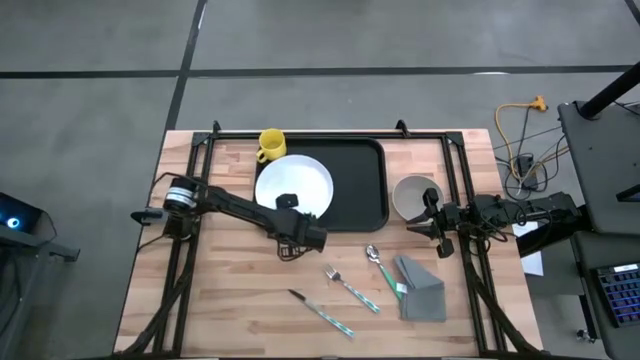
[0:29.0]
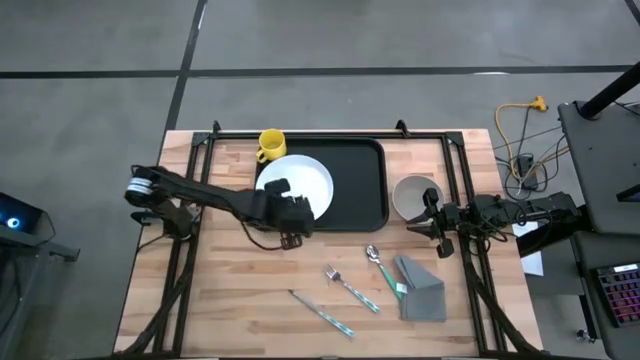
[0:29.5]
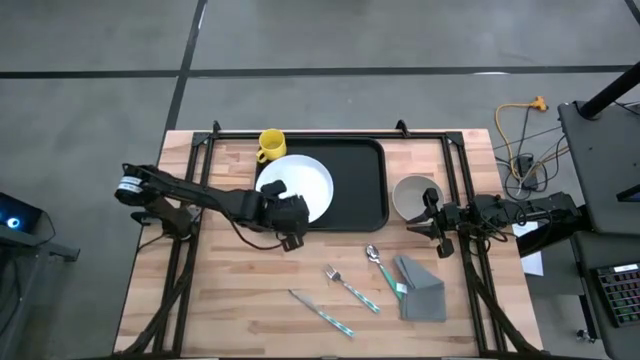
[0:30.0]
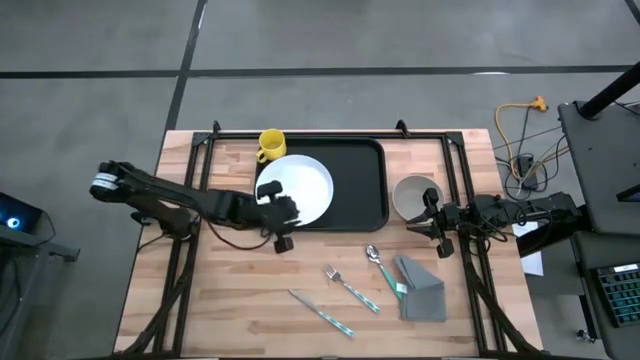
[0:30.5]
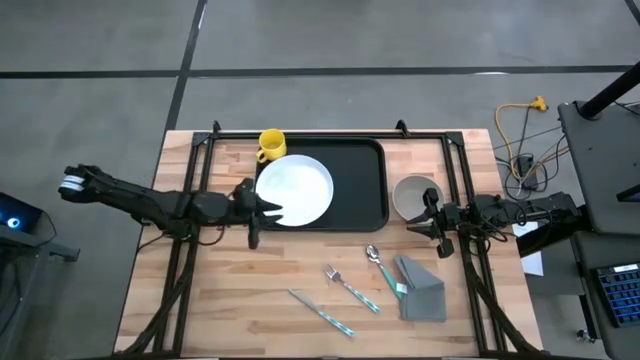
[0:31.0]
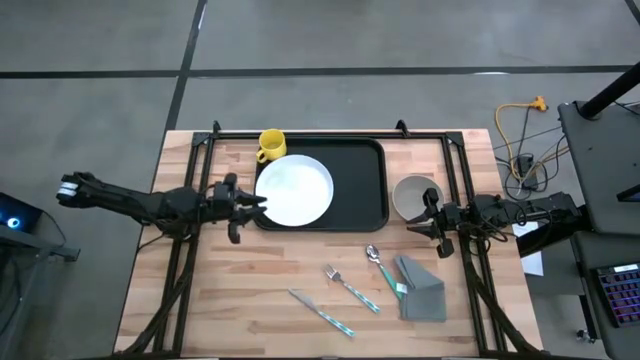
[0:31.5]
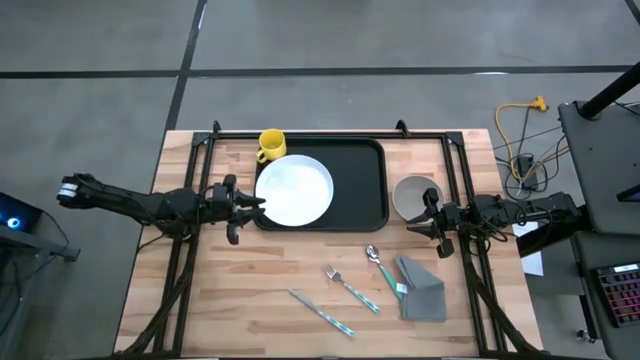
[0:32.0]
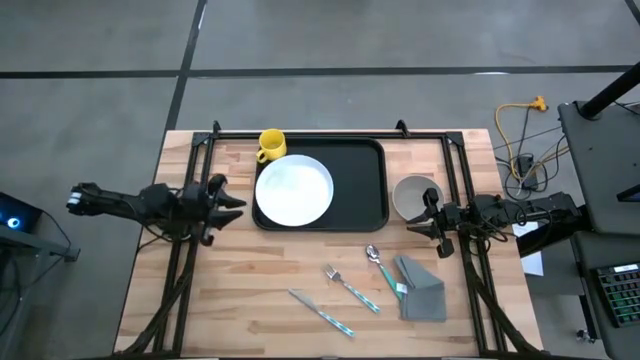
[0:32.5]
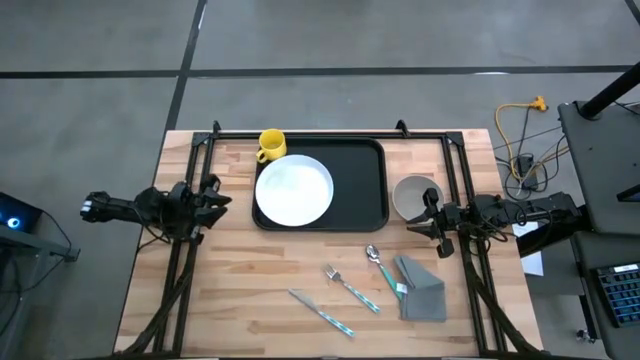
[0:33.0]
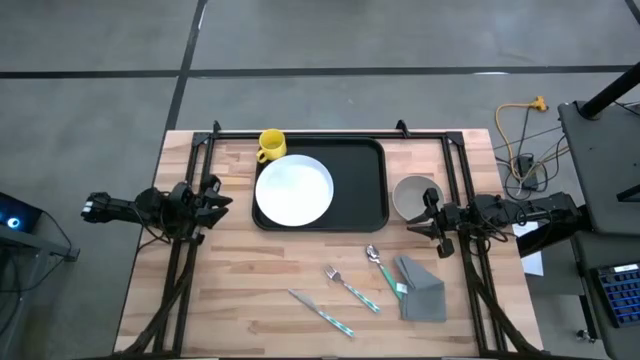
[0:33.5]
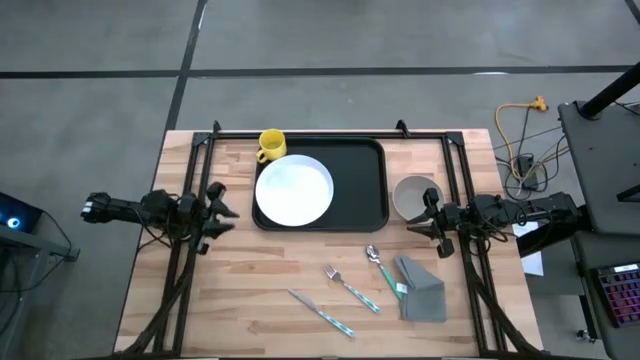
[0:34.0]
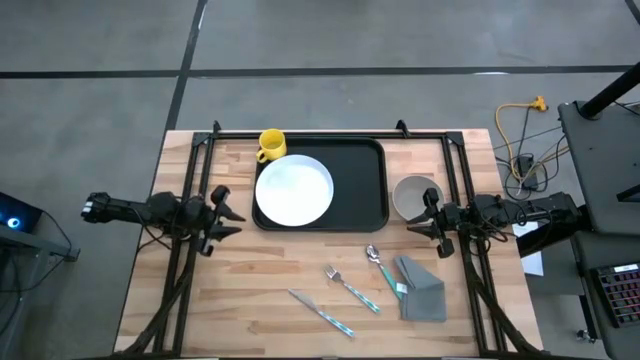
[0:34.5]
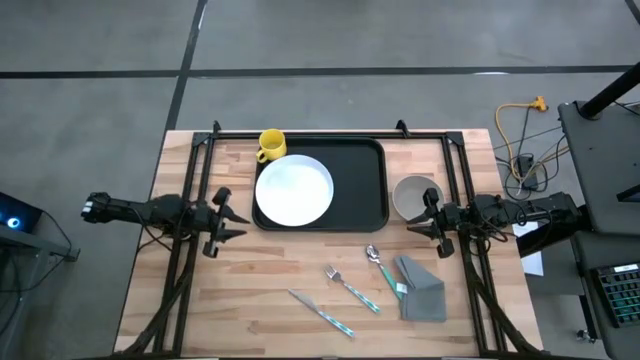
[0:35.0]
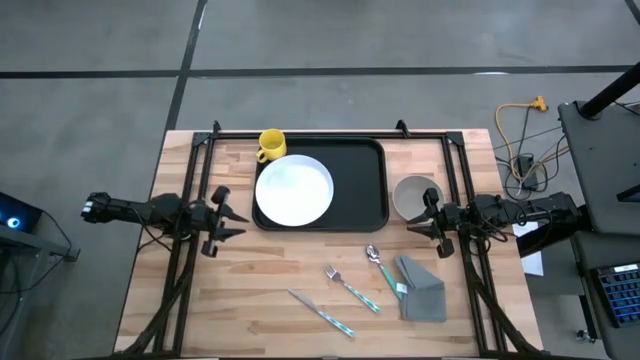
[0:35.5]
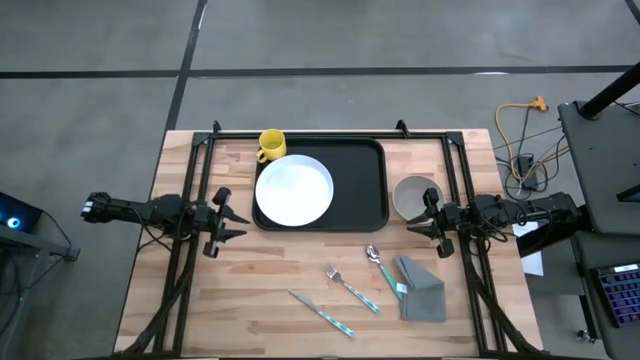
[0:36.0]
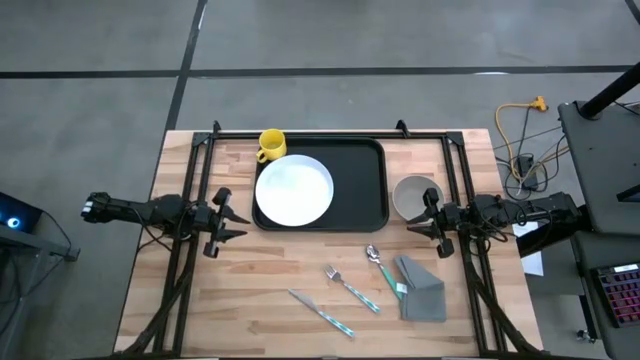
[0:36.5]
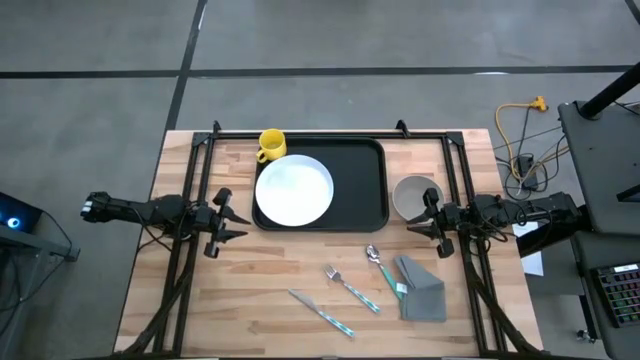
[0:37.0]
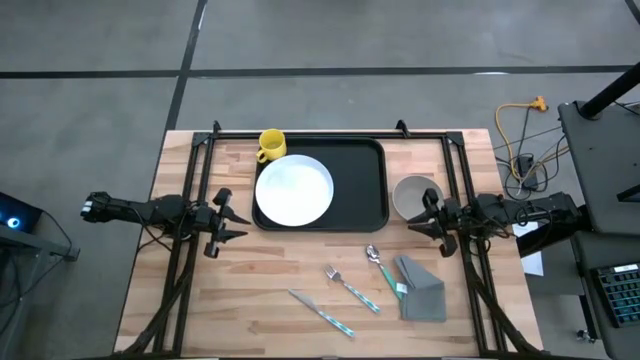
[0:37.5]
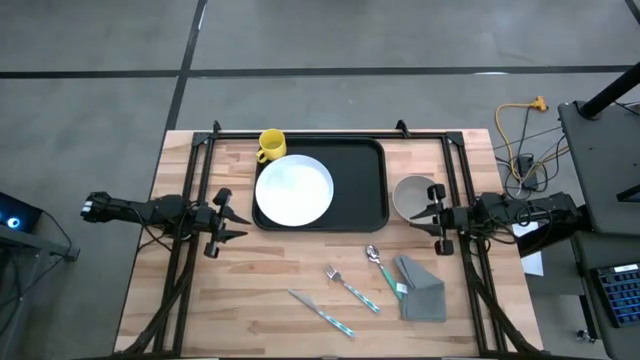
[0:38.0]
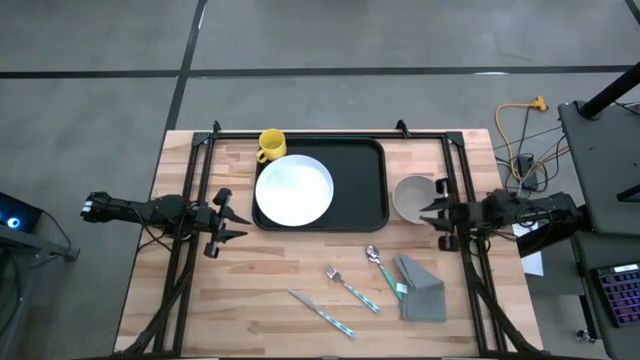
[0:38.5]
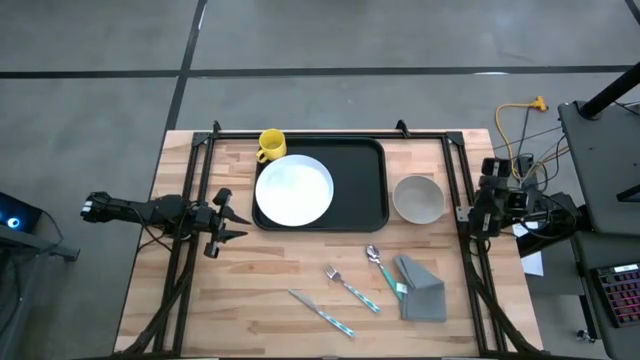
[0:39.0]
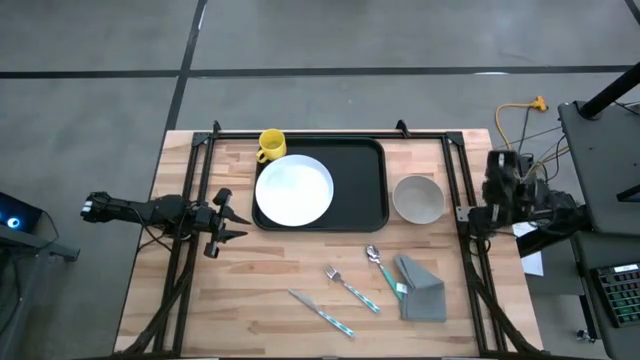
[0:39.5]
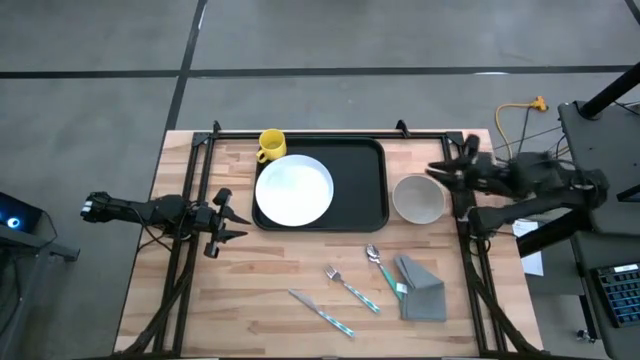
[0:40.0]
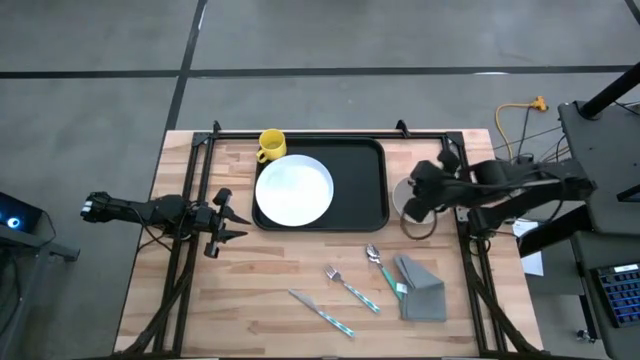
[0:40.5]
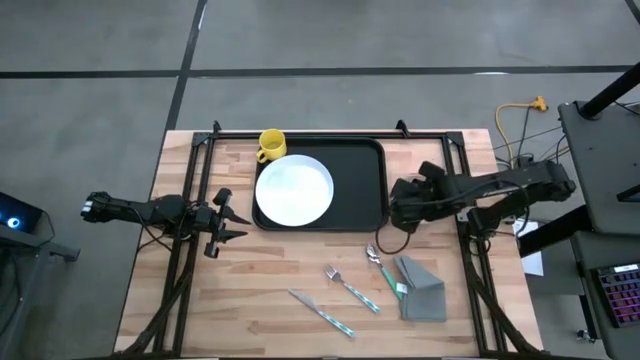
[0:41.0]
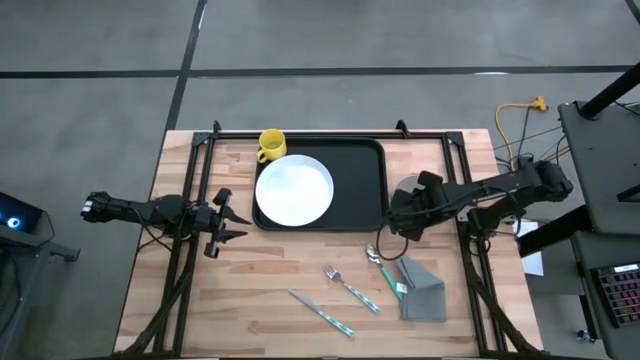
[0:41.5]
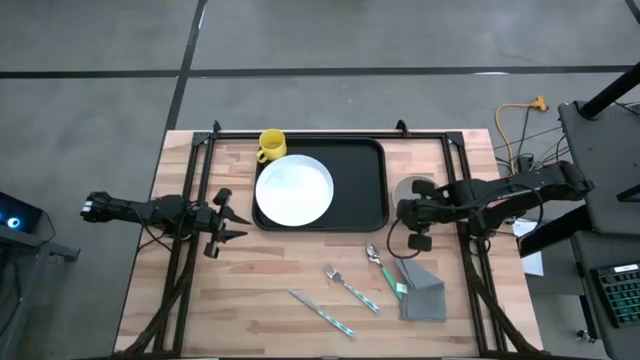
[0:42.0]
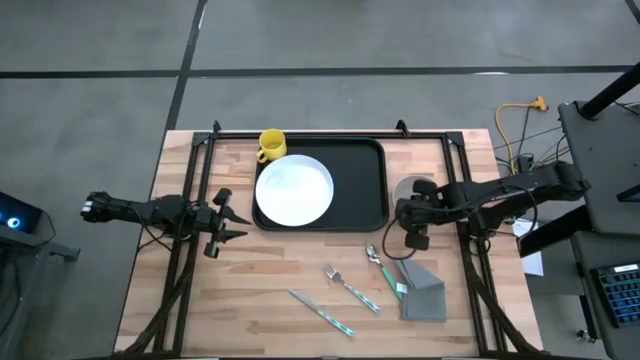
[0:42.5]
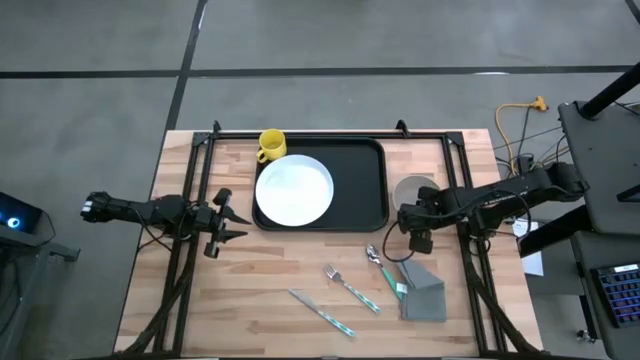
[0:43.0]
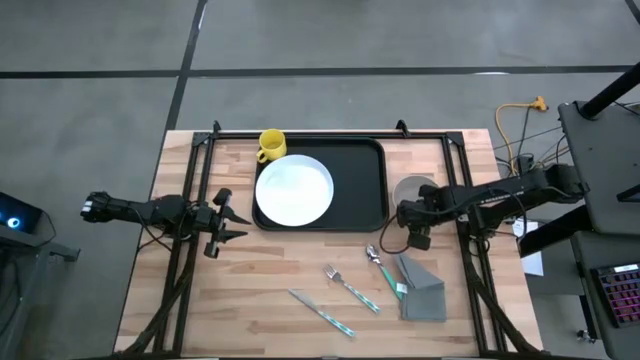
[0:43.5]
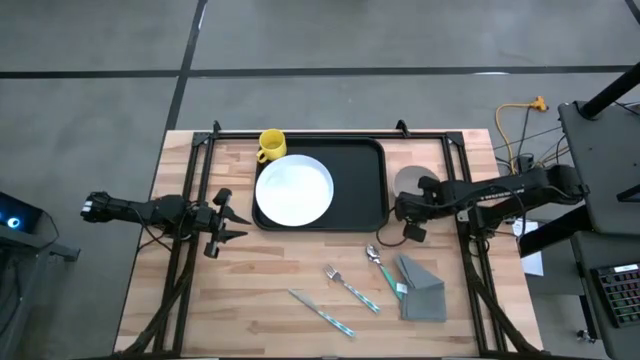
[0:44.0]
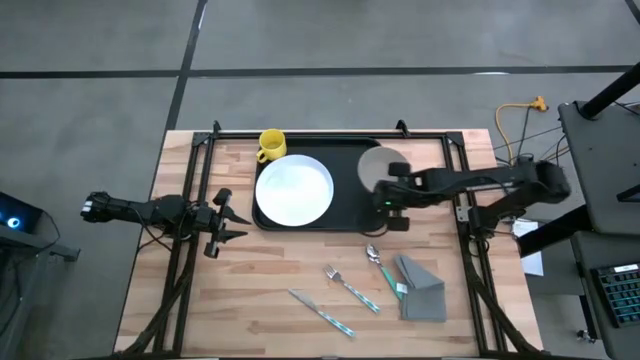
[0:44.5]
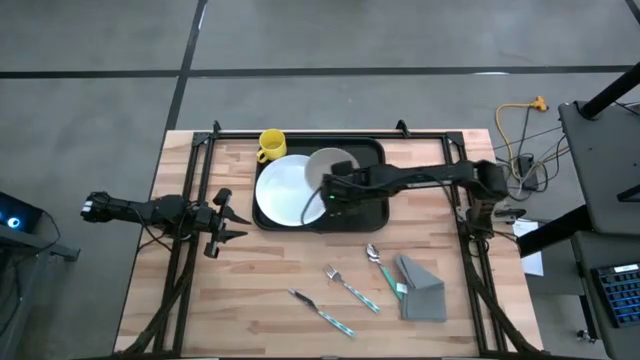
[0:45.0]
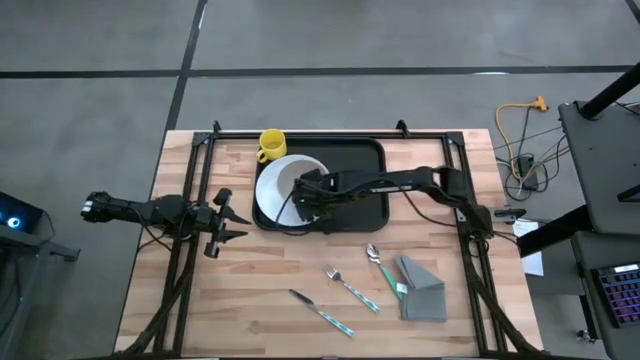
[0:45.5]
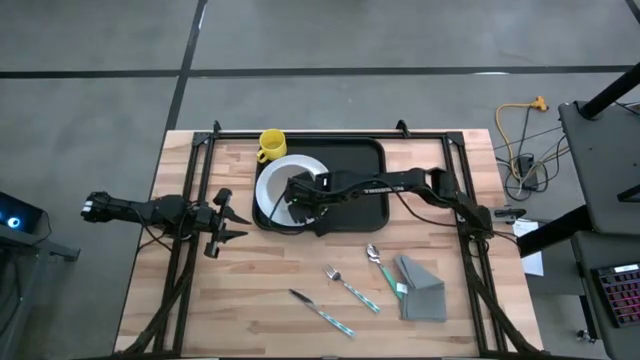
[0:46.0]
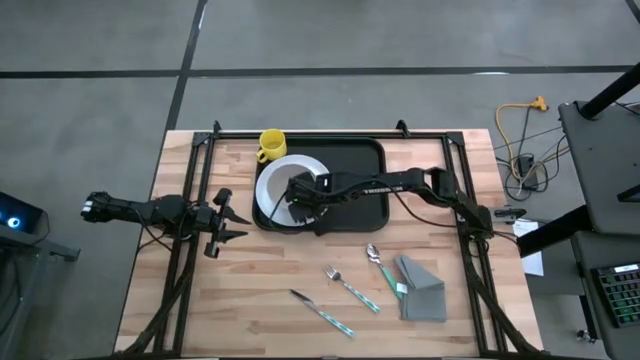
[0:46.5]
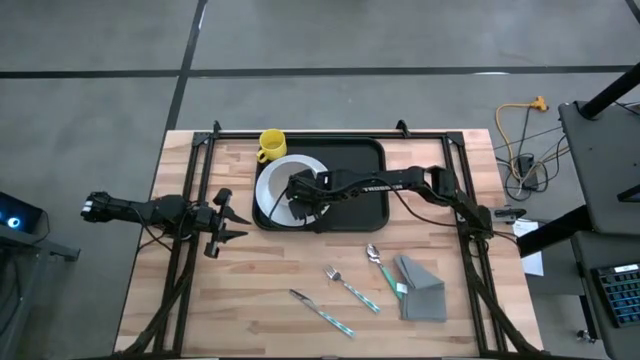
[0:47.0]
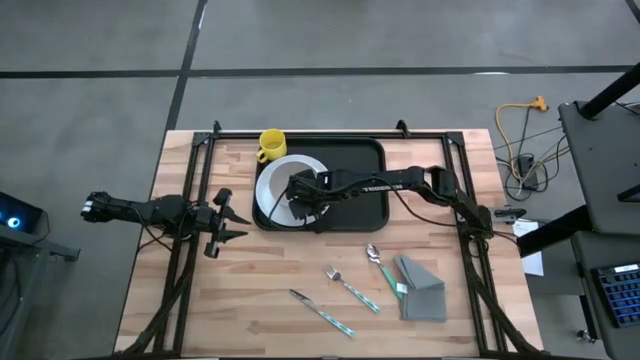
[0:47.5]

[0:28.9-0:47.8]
Task: Set up tray
Put the gray bowl on top of the plate on the black serving tray

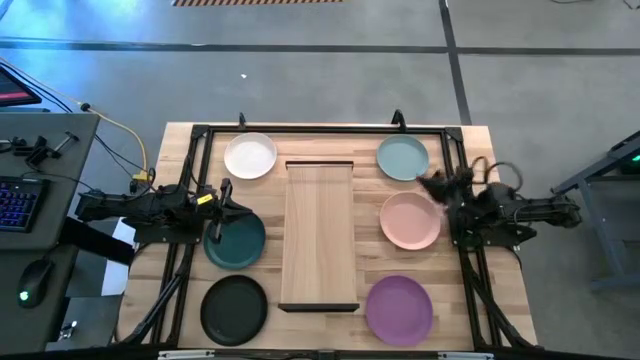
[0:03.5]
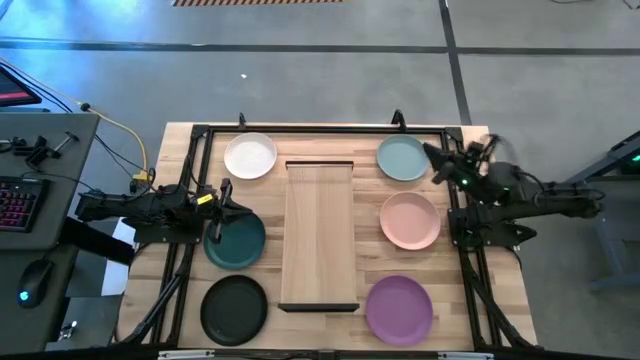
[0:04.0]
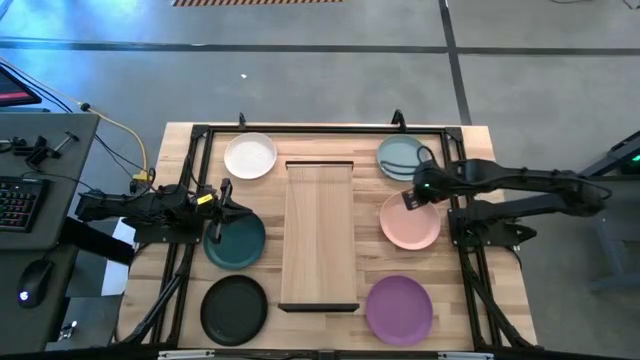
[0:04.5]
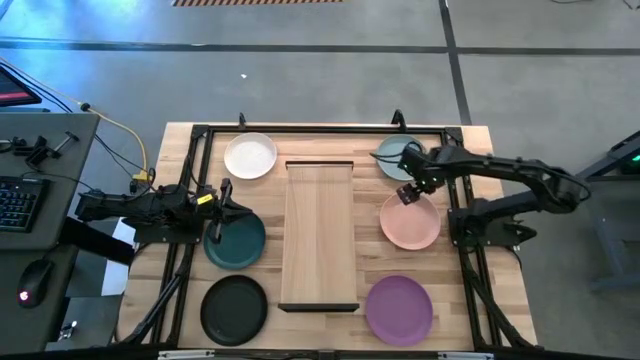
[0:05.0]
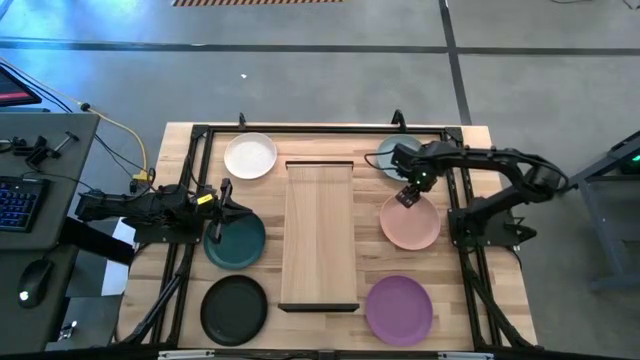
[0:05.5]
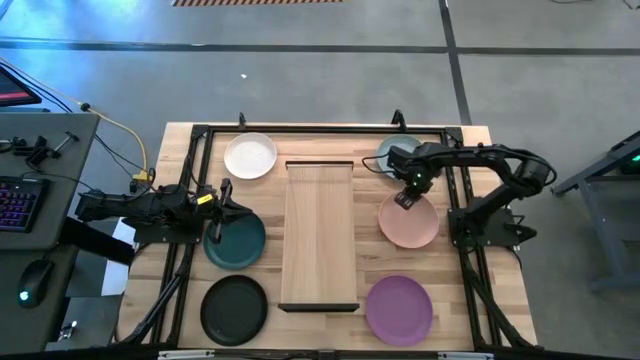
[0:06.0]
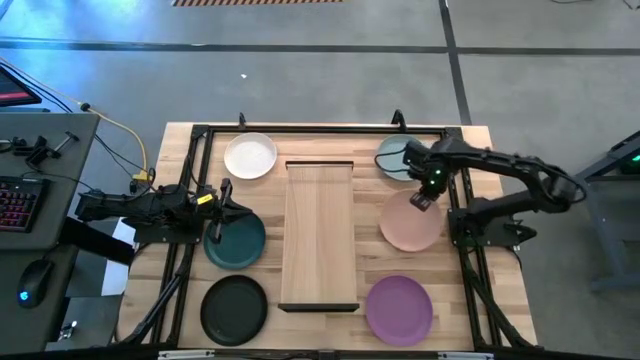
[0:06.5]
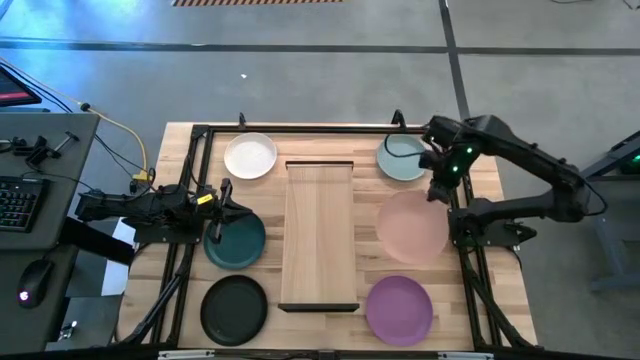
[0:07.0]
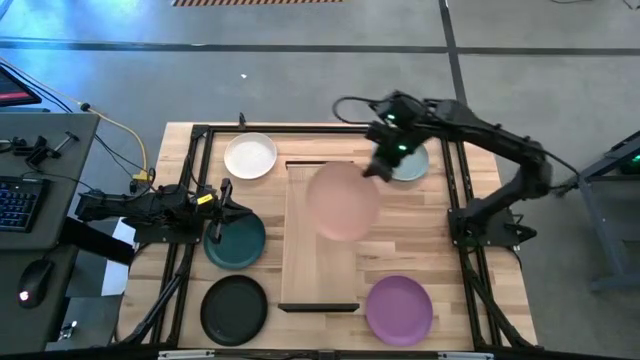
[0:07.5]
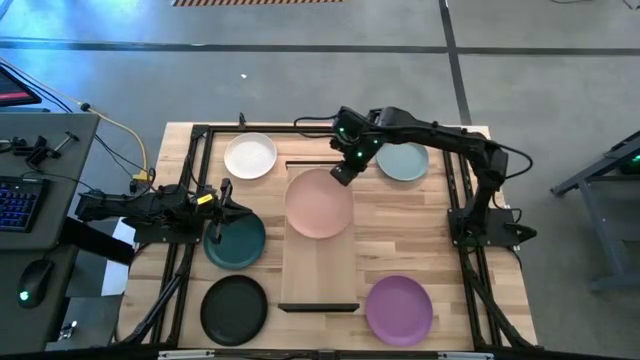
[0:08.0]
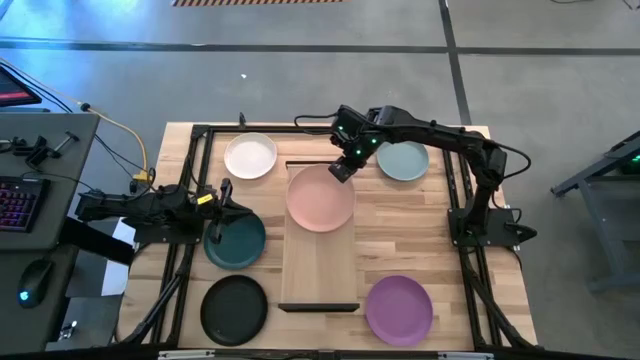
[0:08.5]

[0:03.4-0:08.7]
Task: Place and stack plates onto a shelf
Put the pink plate on the shelf
